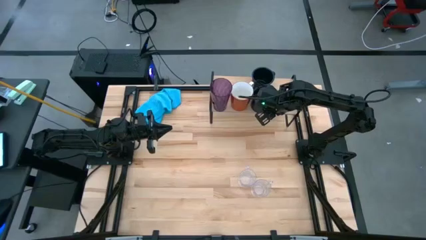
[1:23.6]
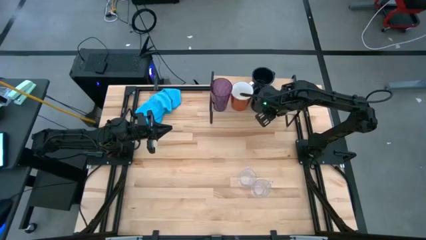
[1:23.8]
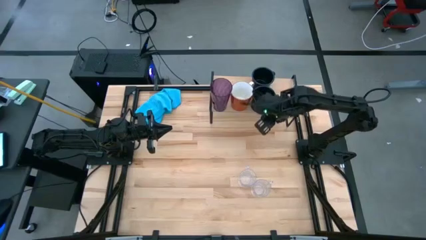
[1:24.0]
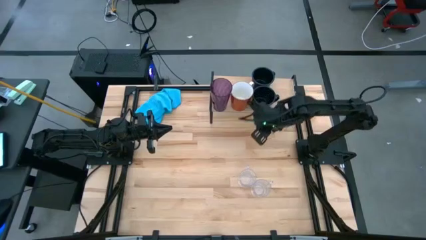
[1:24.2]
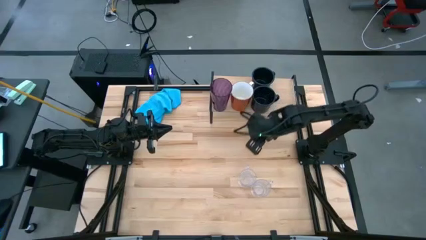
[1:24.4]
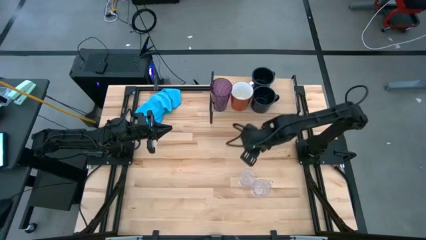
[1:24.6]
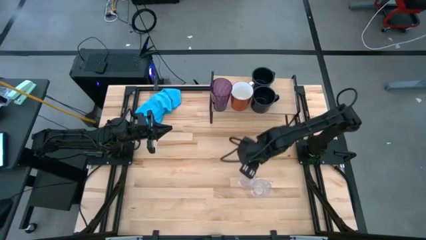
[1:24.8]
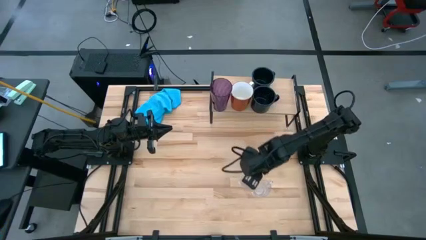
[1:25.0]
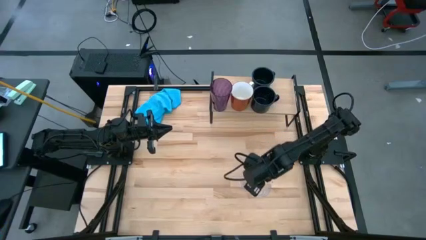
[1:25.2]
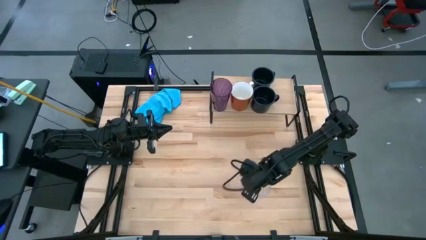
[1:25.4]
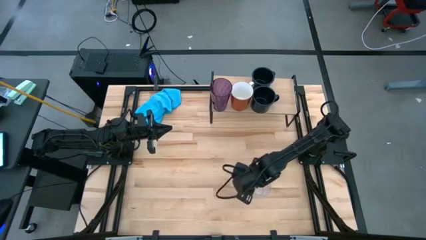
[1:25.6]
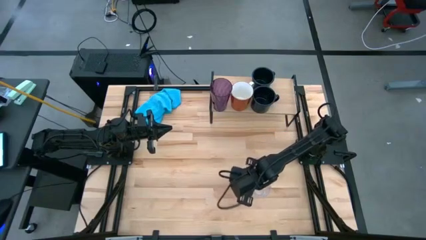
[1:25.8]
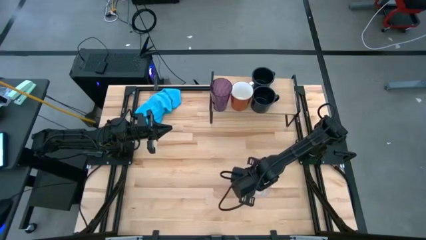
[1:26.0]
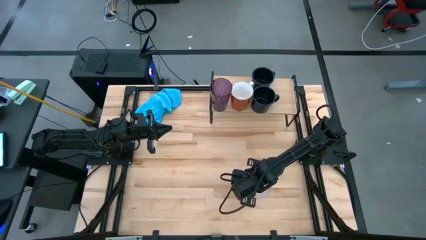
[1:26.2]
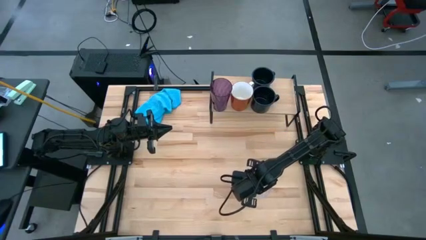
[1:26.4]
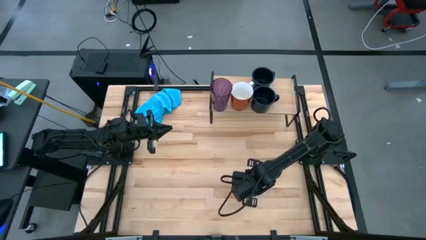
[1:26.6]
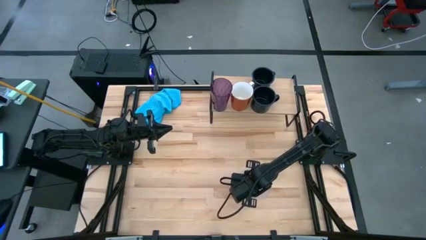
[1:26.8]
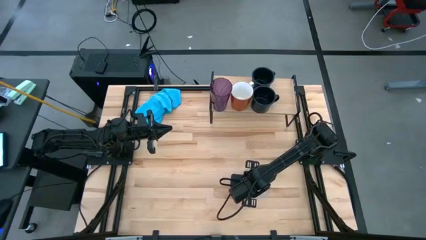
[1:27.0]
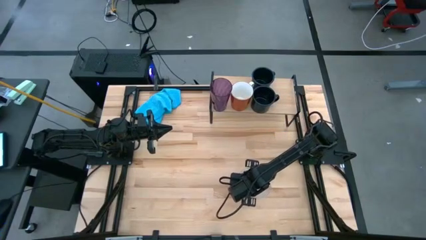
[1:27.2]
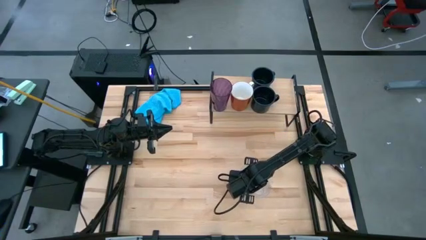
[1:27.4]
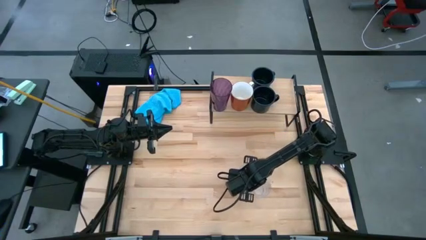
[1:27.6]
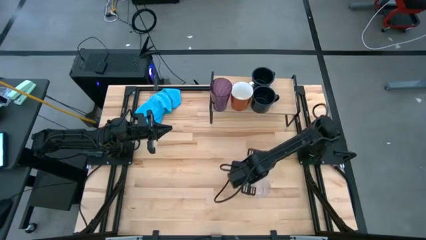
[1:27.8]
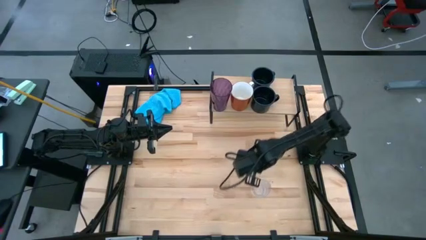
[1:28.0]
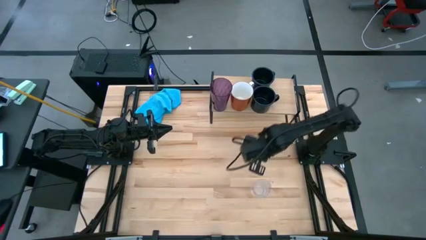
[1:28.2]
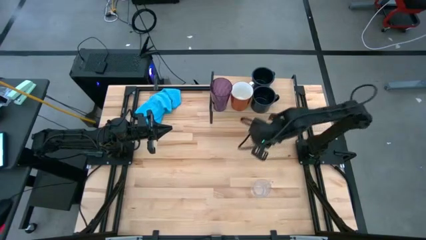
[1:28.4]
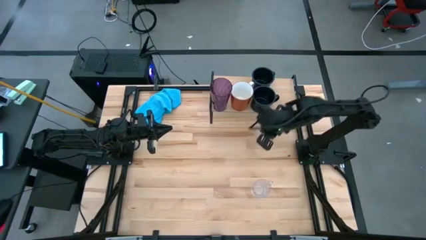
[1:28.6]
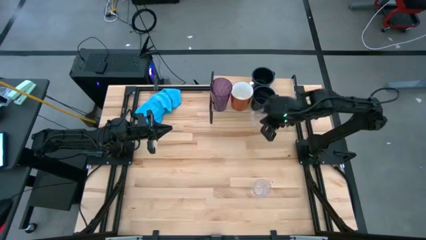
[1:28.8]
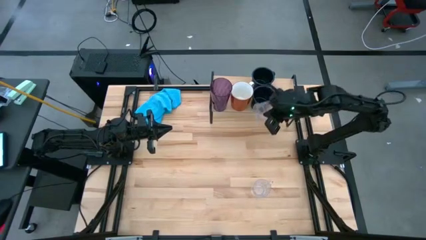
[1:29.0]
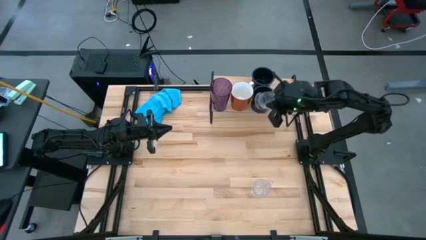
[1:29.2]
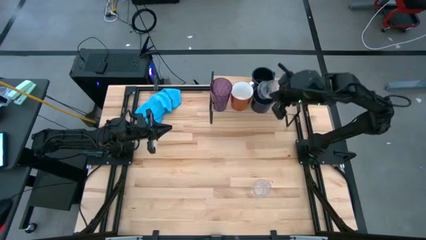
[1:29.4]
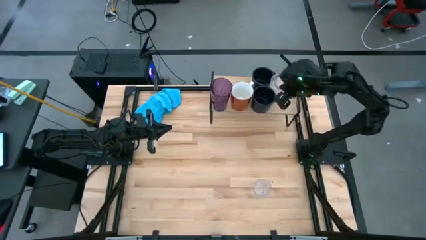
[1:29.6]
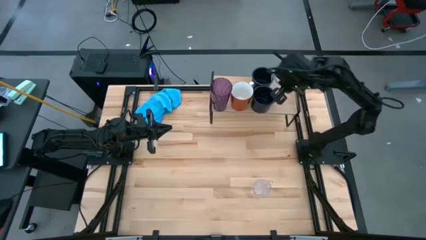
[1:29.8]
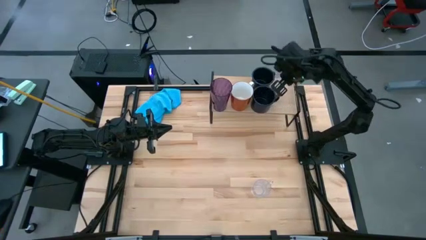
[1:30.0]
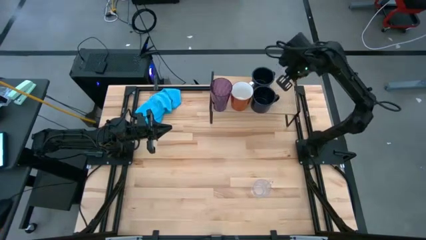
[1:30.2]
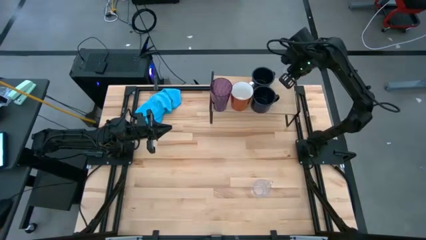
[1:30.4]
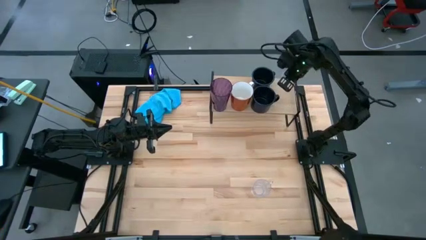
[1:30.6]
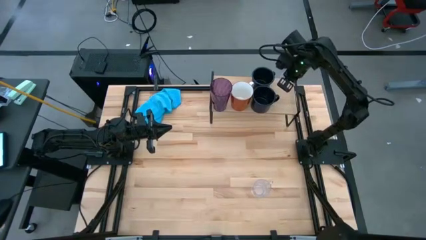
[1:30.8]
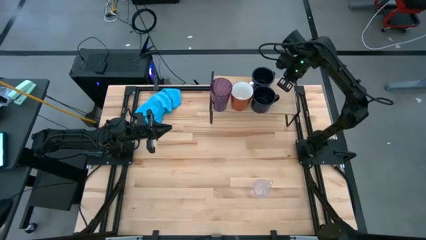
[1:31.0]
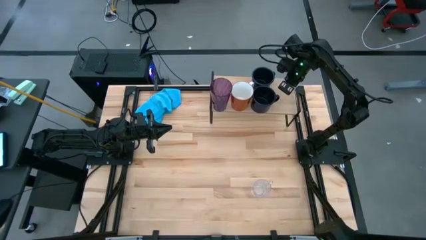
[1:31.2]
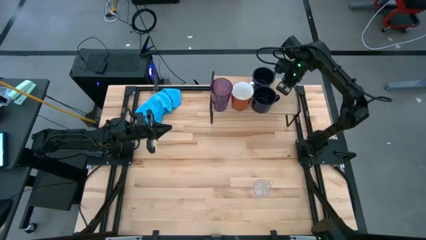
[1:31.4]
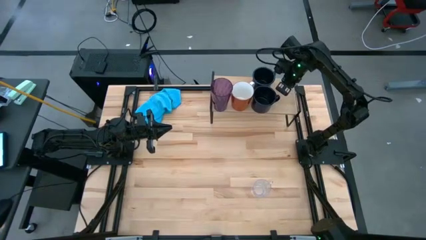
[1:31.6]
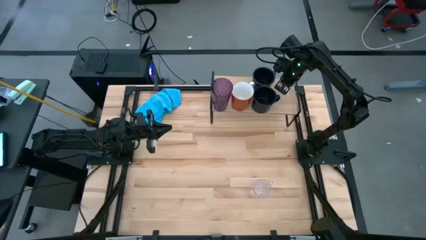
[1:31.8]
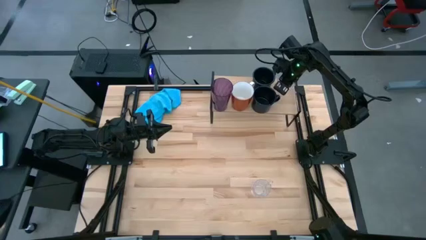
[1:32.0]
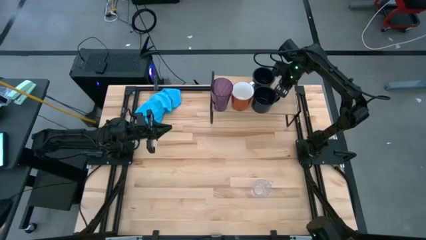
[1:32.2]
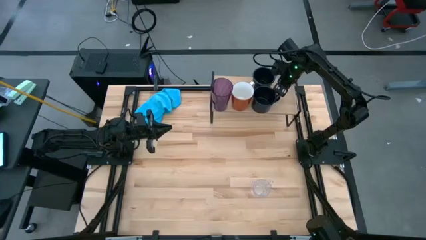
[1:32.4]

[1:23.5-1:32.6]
Task: Stack small to large cups/mugs on shelf
Put the left transparent mug on the shelf

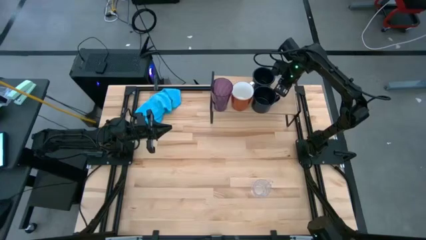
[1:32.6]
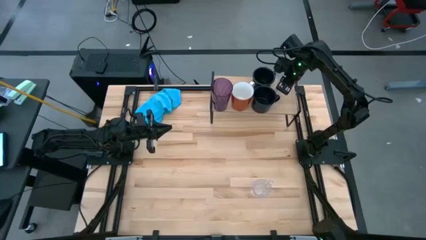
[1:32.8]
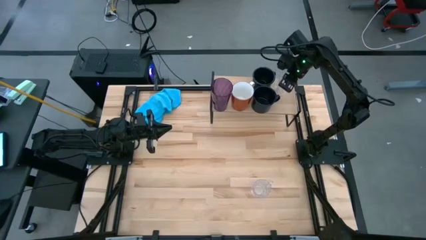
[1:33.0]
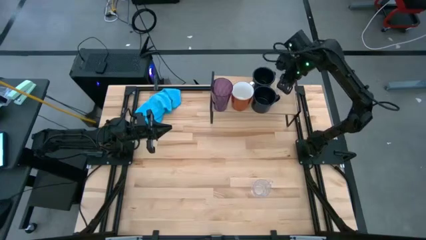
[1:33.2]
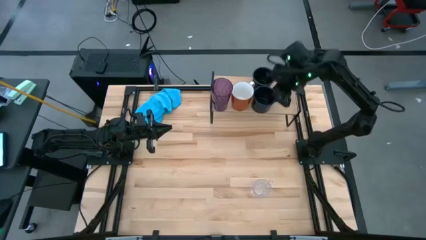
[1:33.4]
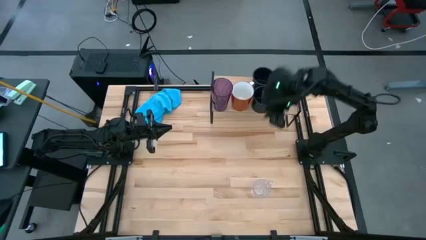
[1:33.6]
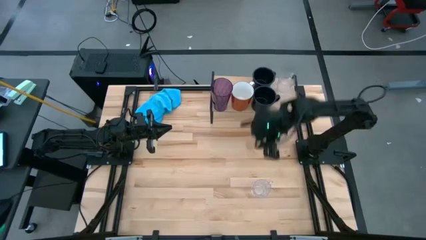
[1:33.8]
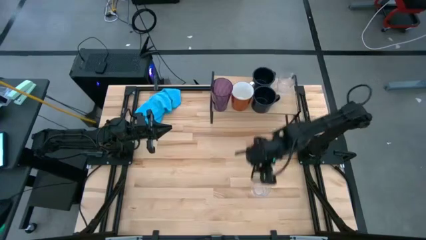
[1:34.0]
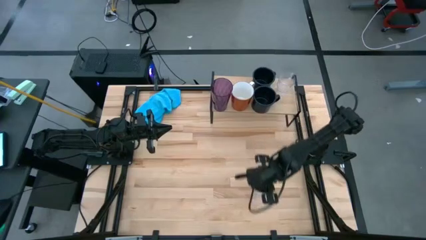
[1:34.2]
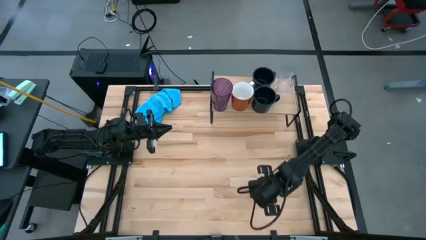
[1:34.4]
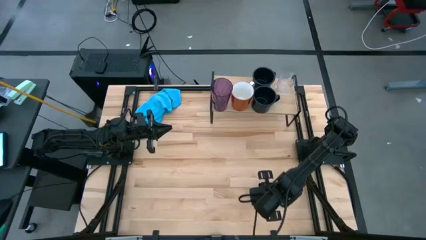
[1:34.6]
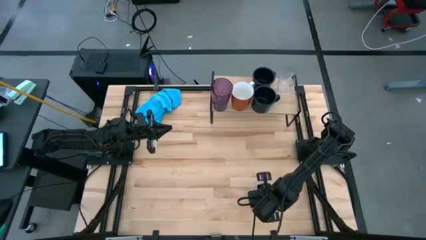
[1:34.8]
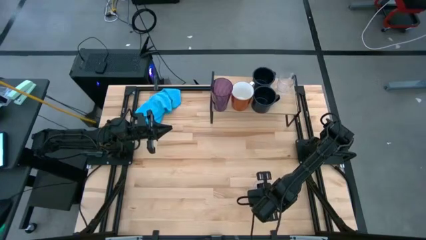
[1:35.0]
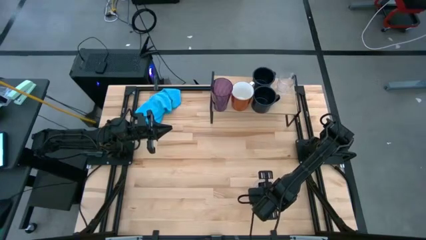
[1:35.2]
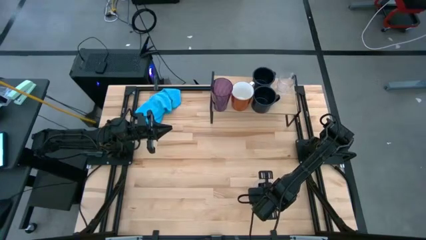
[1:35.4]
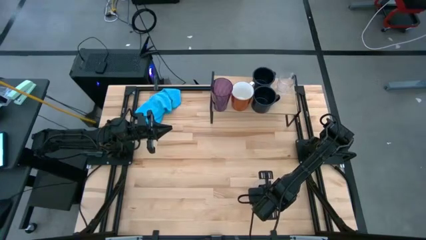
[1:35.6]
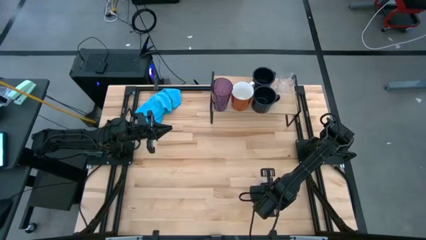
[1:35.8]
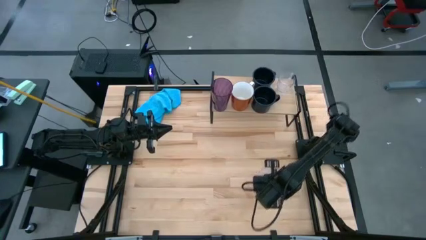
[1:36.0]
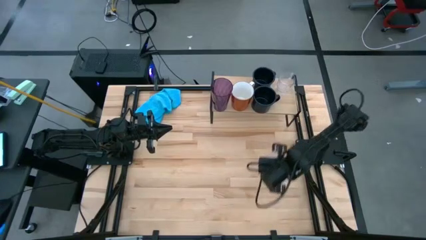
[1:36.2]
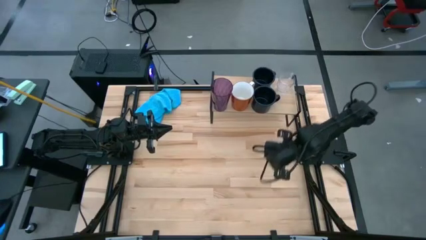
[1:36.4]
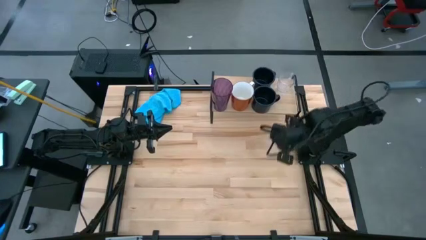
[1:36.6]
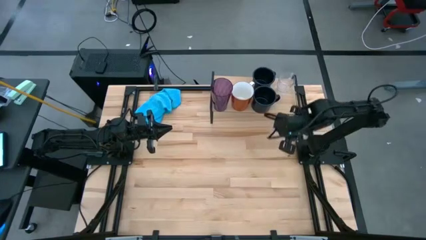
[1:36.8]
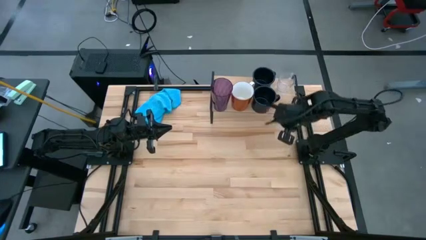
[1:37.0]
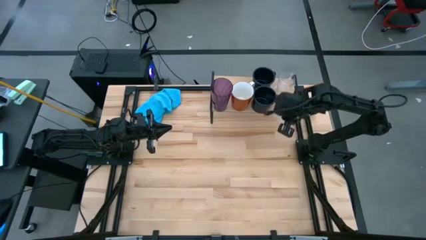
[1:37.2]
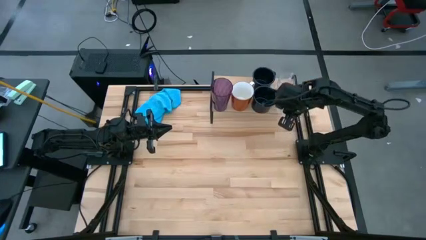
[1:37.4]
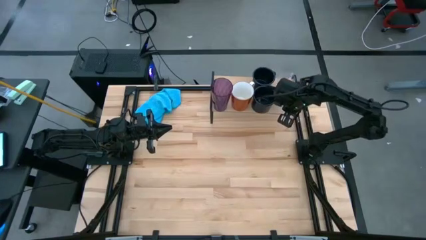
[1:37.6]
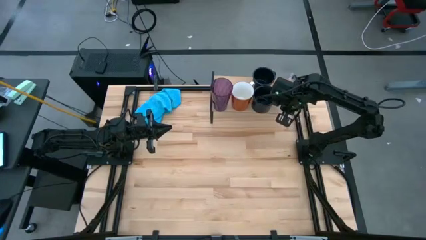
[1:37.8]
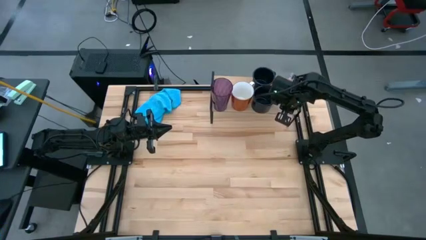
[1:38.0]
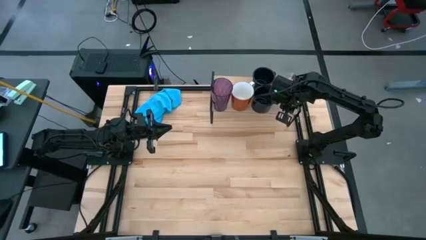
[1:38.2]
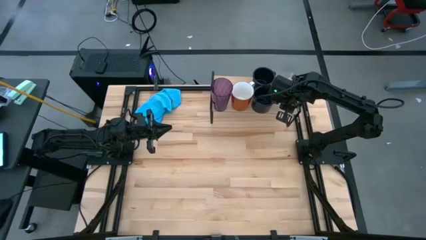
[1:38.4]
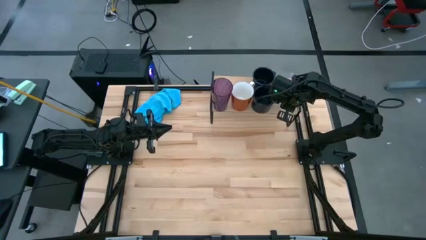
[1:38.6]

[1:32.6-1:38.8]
Put the transparent mug on the shelf aligned with the other transparent mug

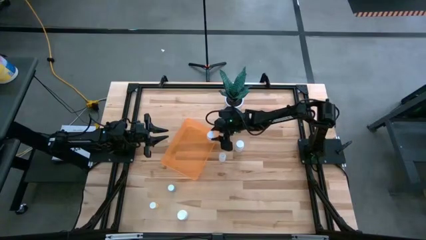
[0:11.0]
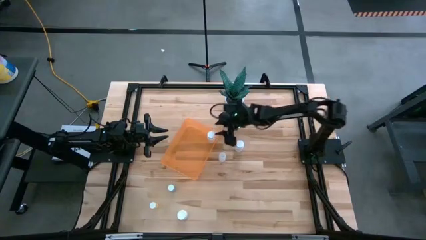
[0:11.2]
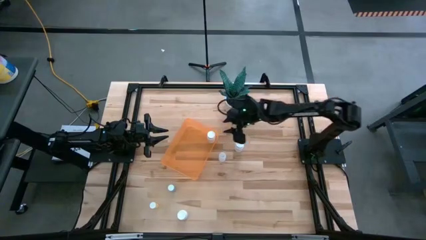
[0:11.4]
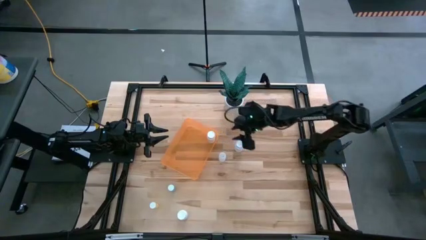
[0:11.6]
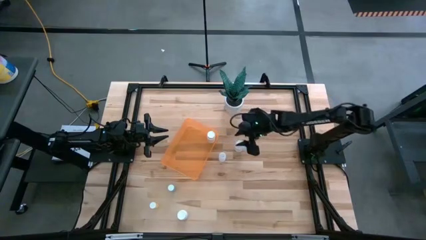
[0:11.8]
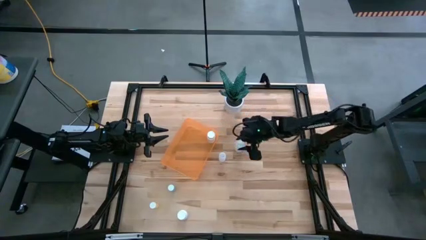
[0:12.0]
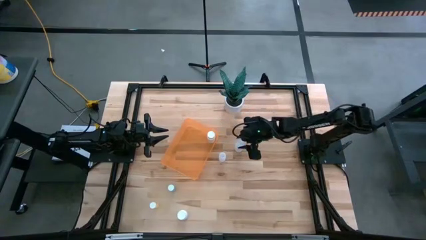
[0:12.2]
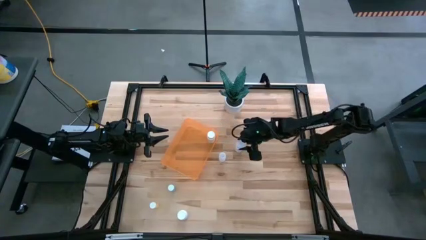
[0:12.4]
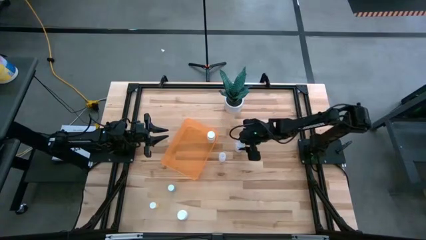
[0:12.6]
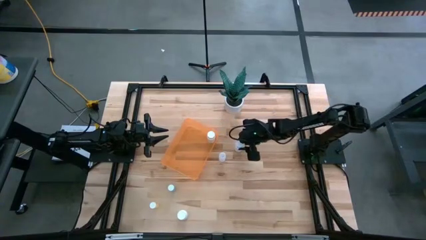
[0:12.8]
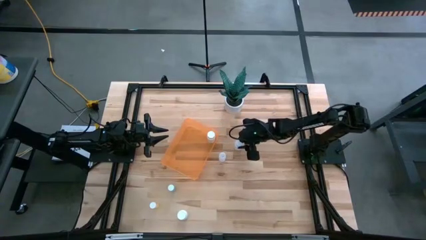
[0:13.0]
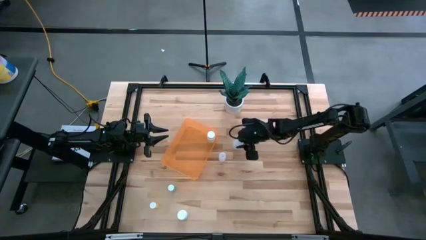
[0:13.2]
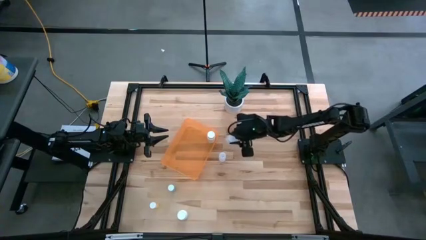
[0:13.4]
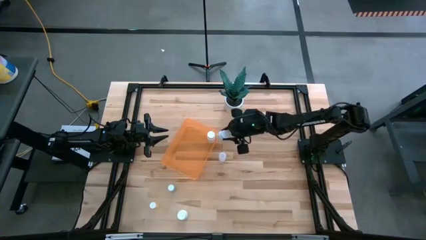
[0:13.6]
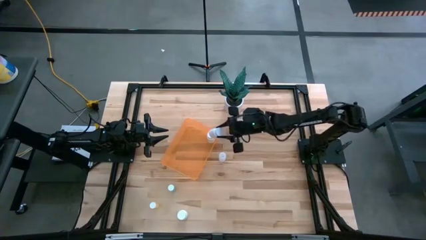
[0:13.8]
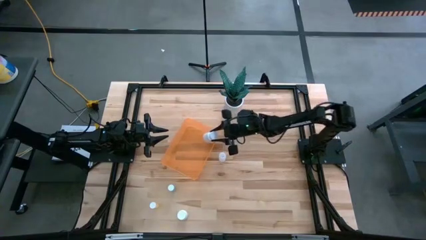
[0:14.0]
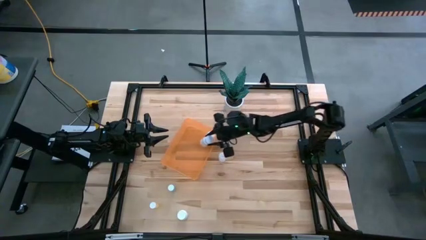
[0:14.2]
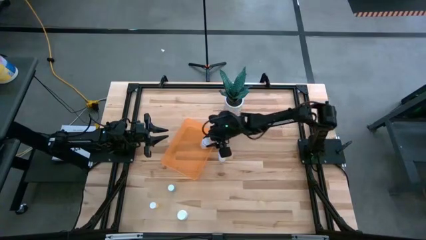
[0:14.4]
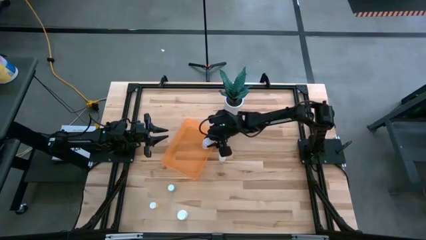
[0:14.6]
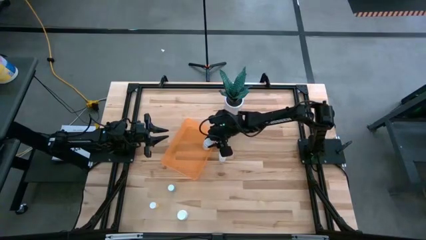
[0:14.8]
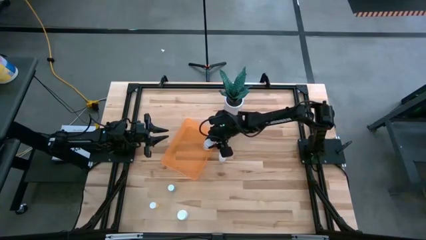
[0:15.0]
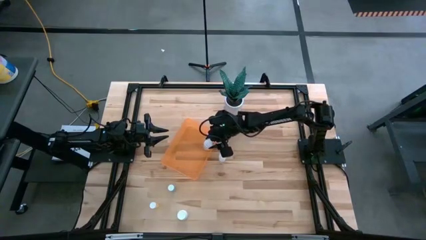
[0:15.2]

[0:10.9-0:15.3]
Task: Pick and place pill bottles into a basket
Put the top white pill bottle into the orange bin
